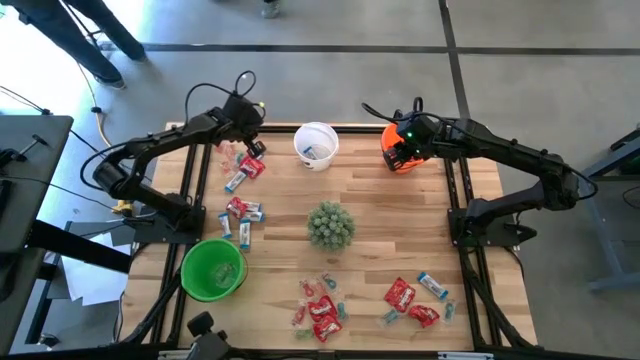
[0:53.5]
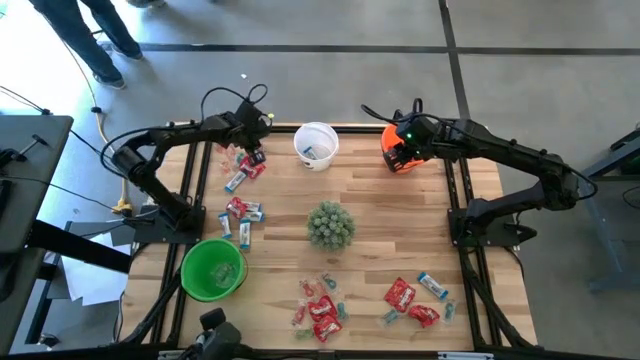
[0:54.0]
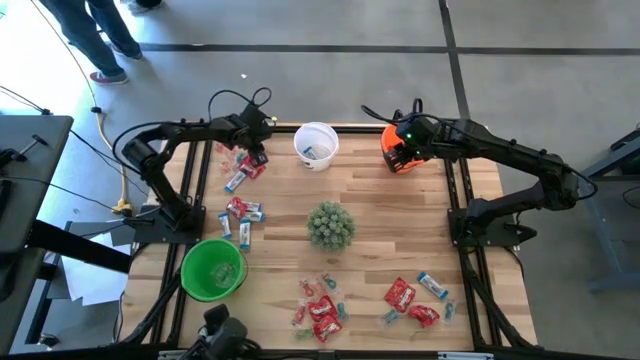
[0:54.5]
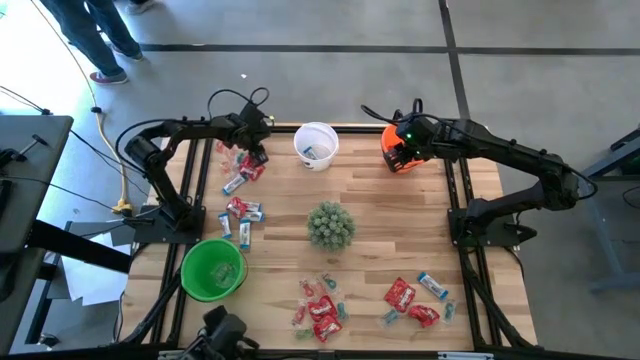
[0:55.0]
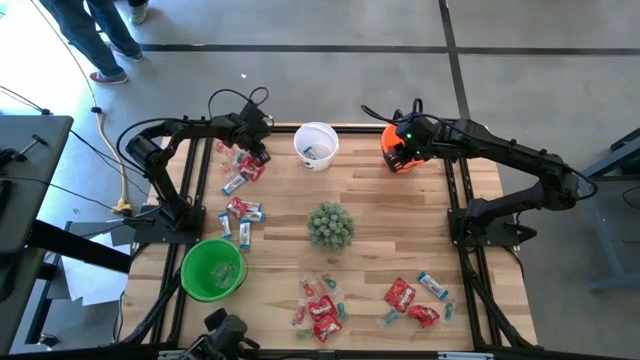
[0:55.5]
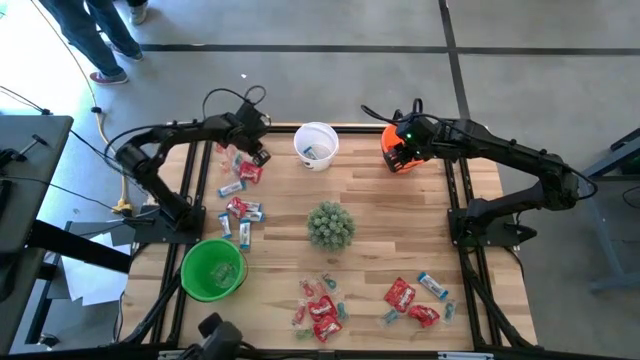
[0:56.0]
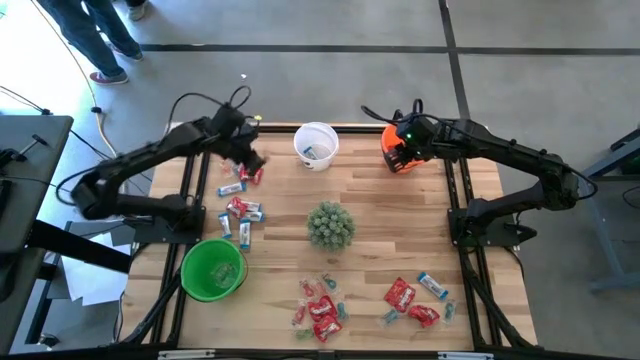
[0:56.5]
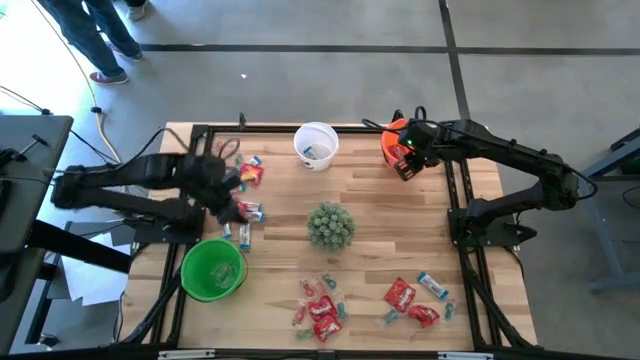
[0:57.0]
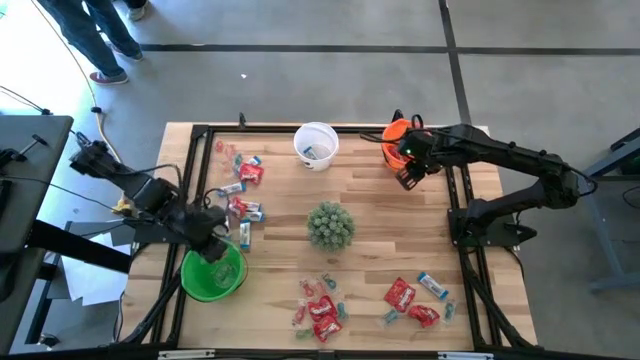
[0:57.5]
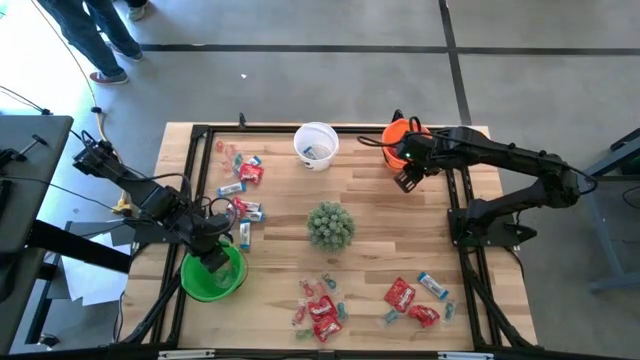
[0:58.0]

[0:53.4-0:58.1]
Task: Sort candy
Put the orange gummy into the green bucket

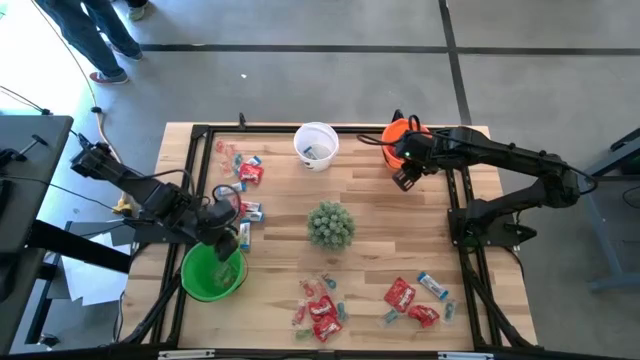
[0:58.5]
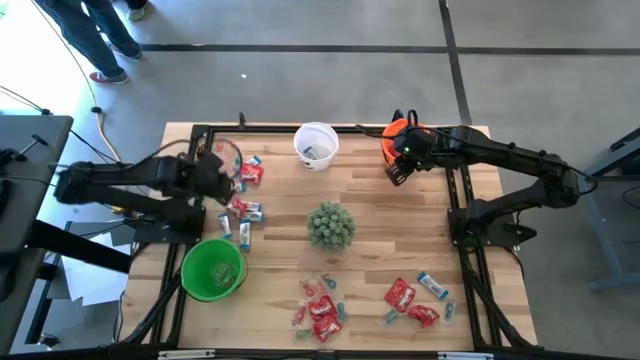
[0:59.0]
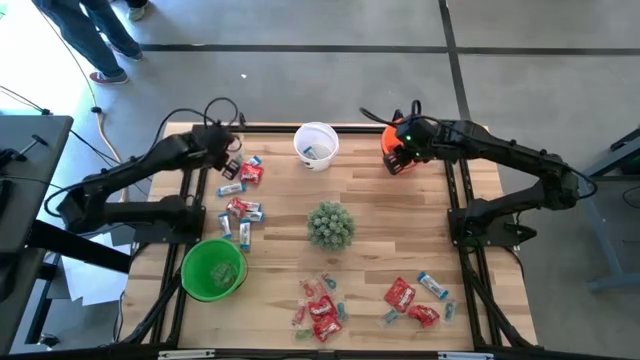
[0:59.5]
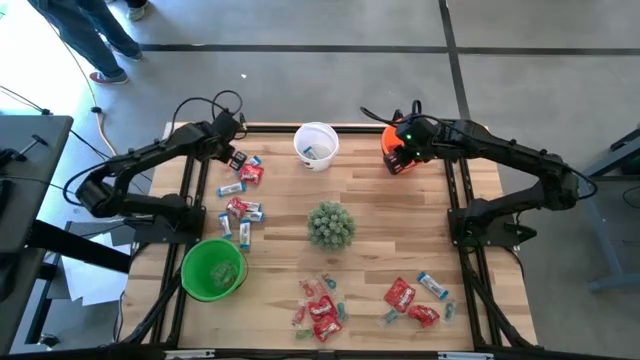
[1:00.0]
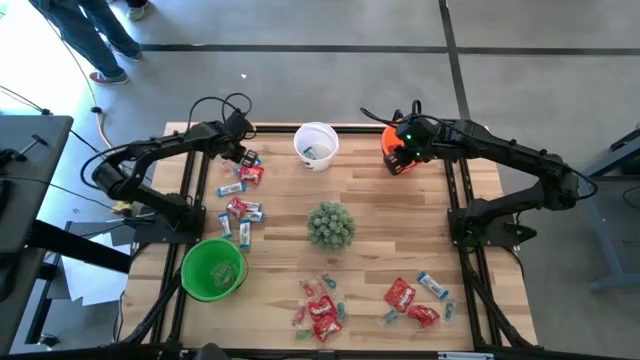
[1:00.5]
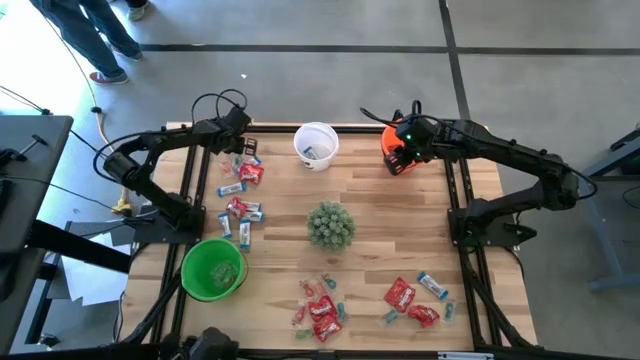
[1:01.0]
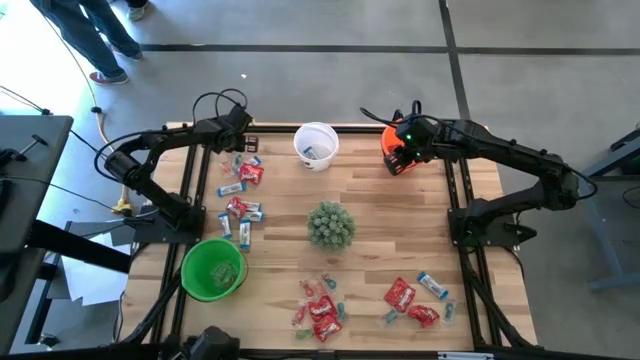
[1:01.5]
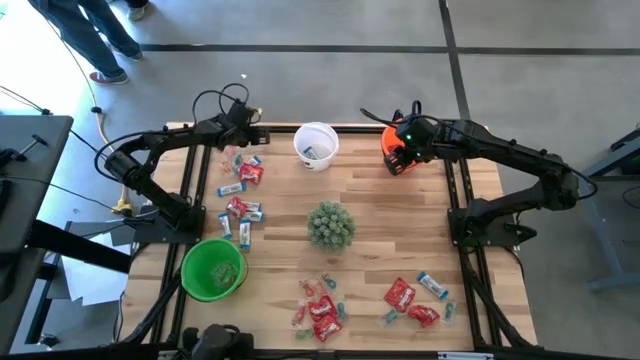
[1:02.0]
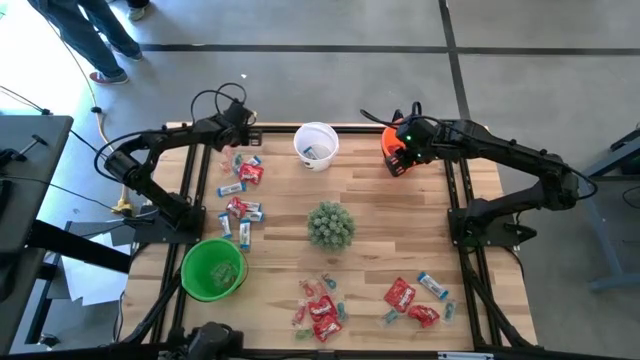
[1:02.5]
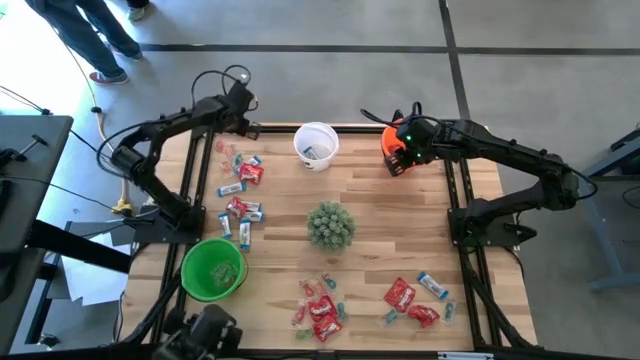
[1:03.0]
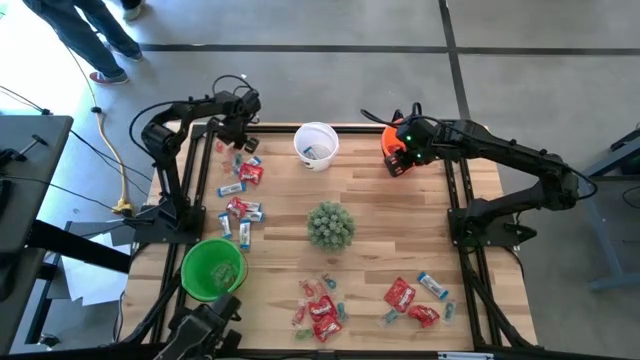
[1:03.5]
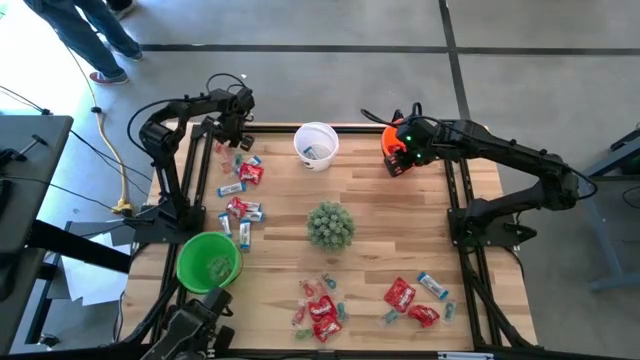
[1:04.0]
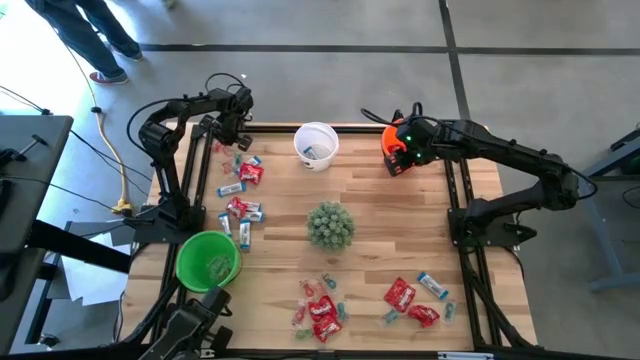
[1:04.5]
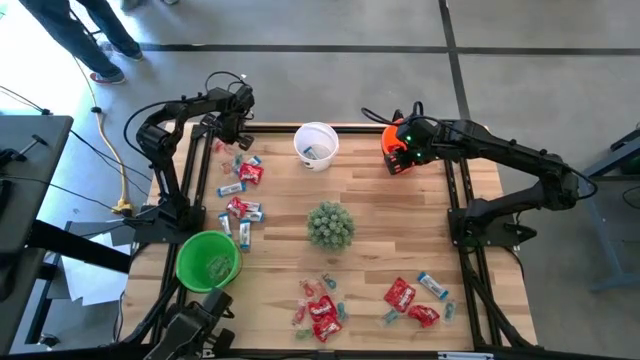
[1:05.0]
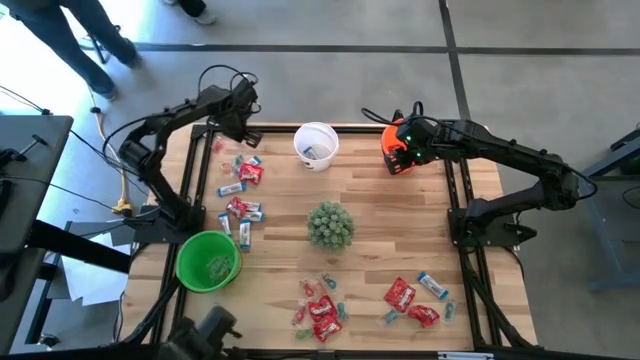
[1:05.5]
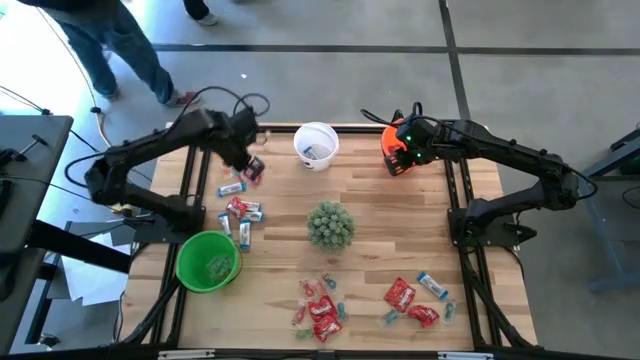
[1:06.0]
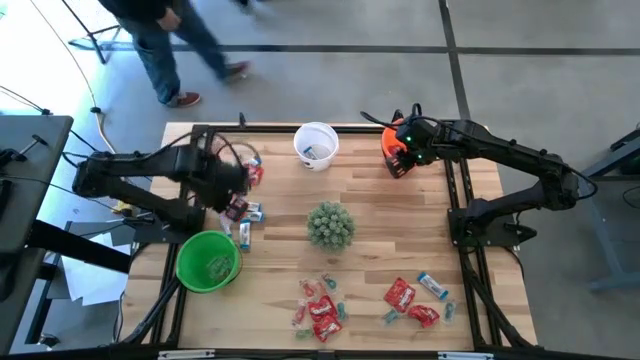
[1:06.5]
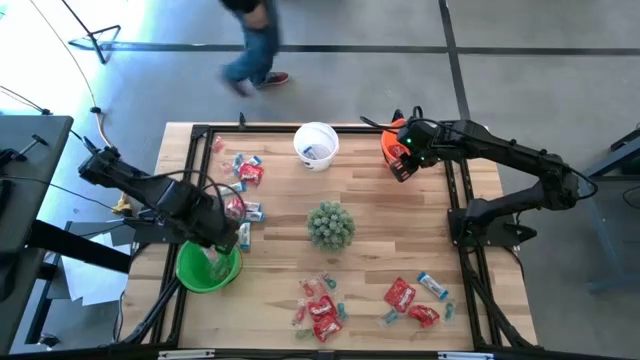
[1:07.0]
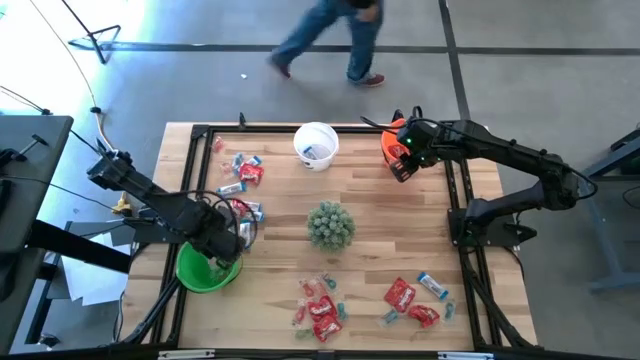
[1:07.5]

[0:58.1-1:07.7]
Put the orange gummy into the green bucket

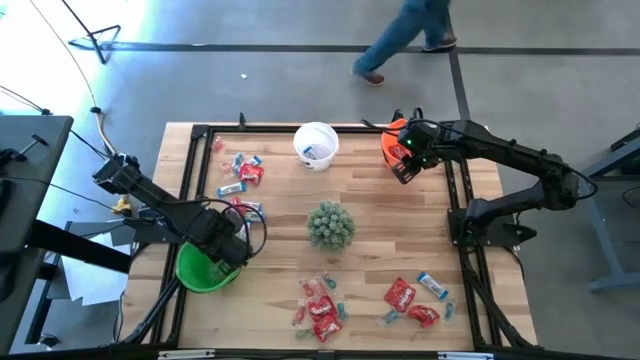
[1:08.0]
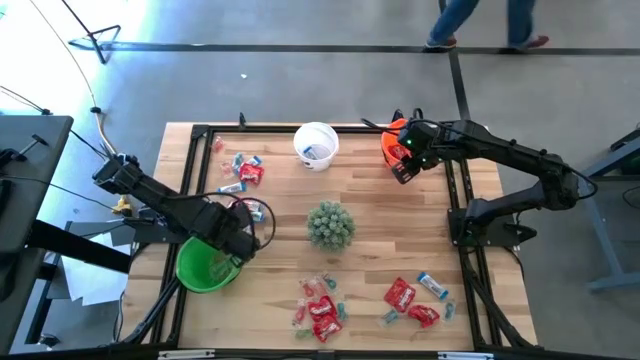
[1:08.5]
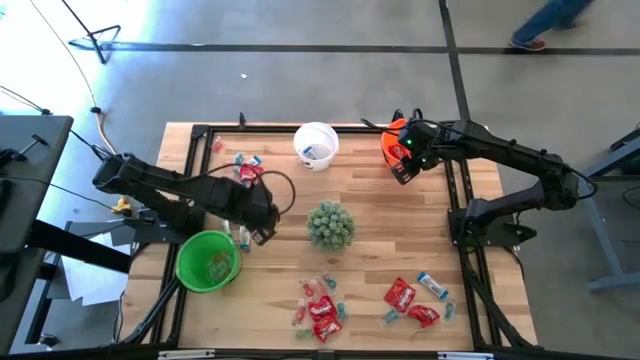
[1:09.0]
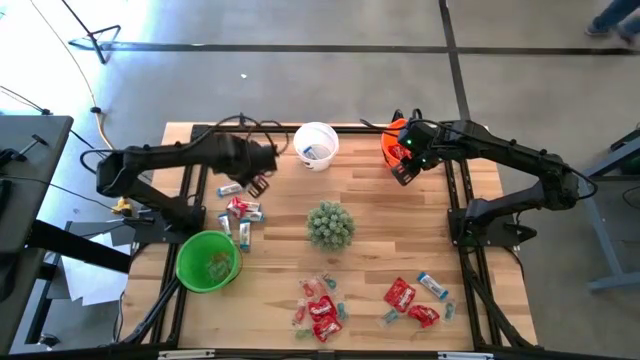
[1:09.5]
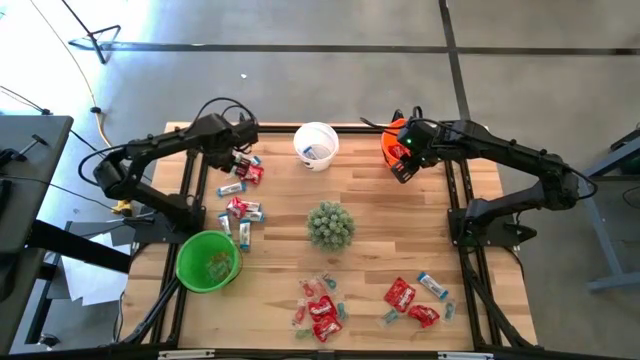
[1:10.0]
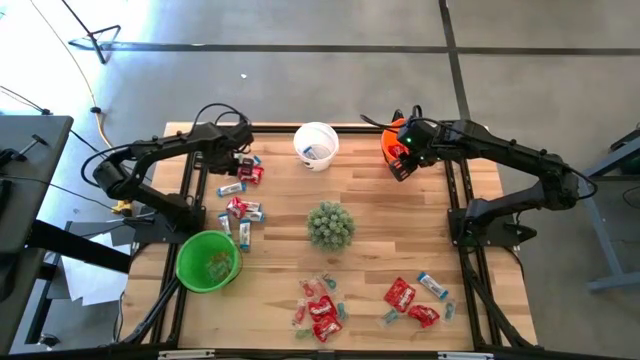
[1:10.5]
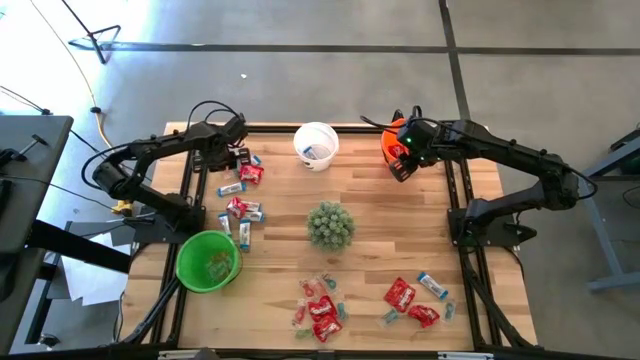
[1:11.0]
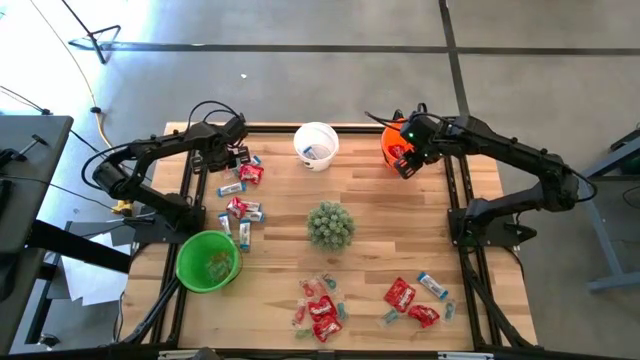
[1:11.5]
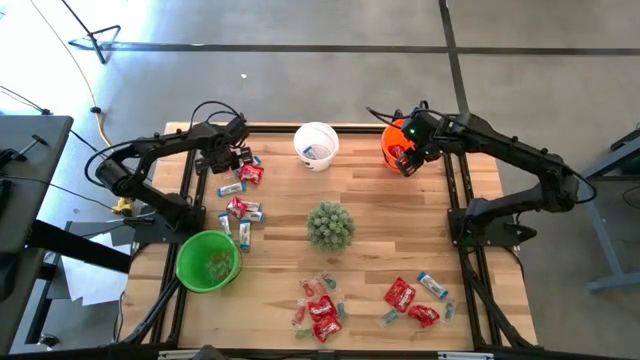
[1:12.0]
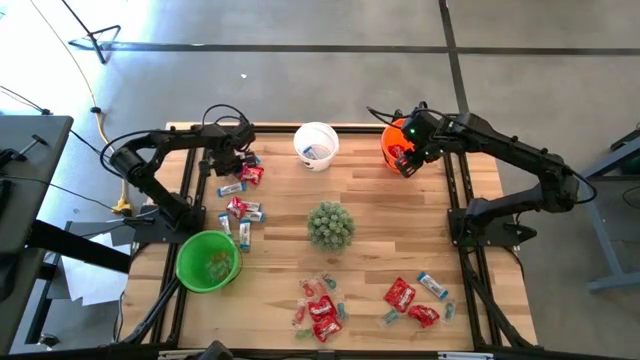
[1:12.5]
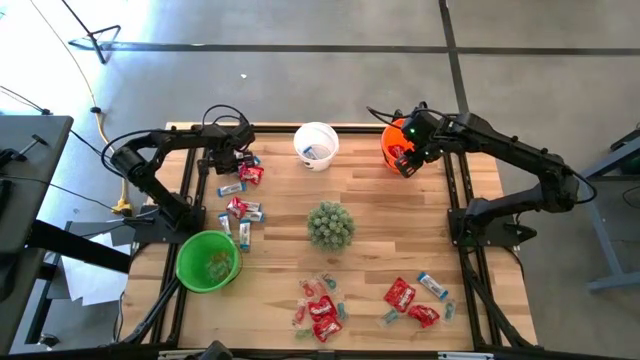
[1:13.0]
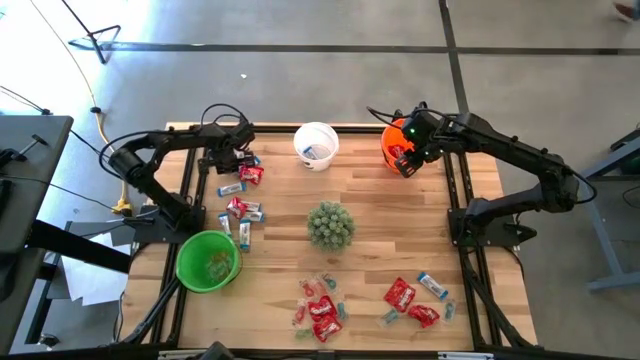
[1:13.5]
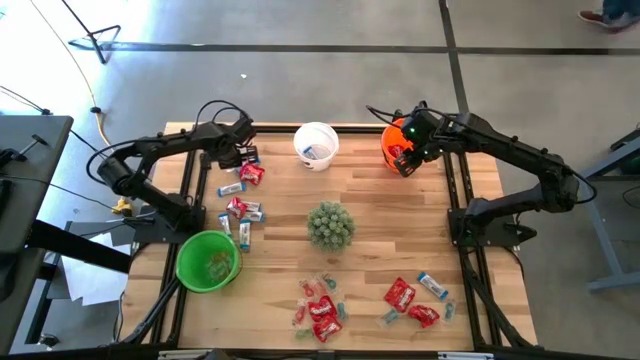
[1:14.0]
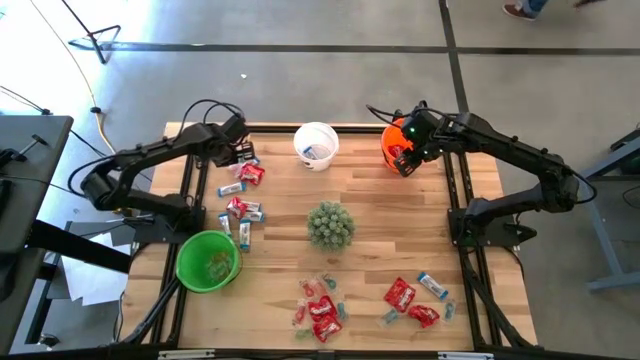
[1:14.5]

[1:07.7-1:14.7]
Put the orange gummy into the green bucket
